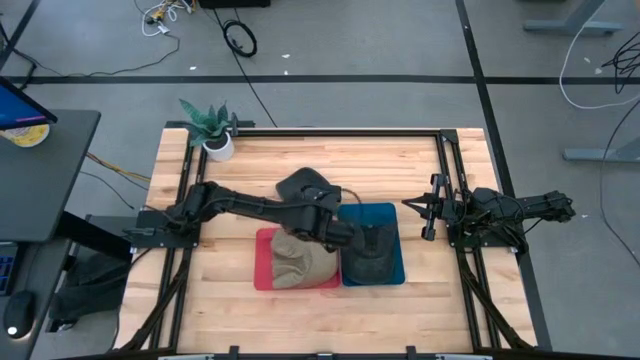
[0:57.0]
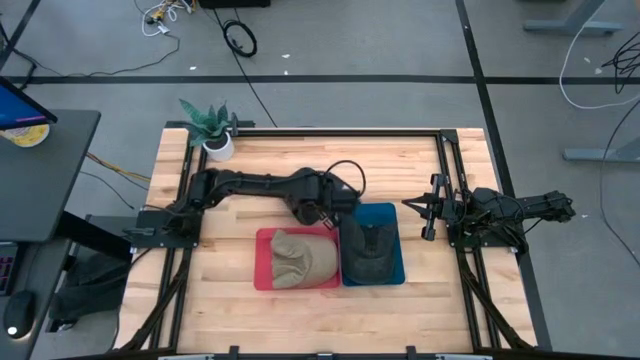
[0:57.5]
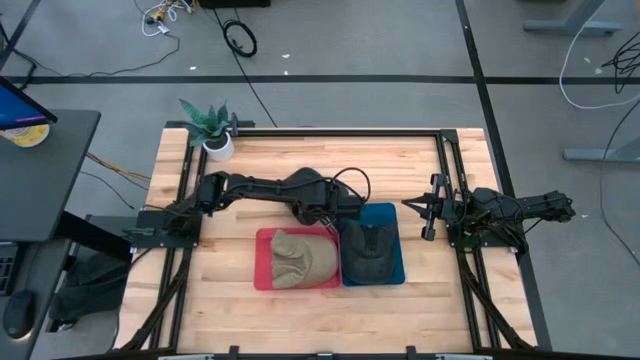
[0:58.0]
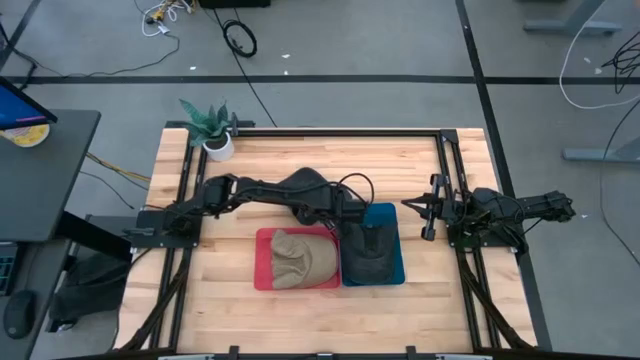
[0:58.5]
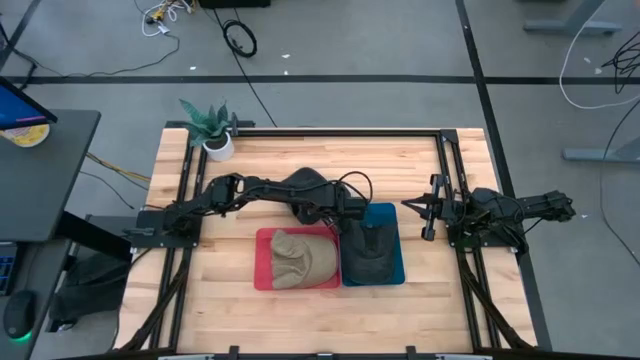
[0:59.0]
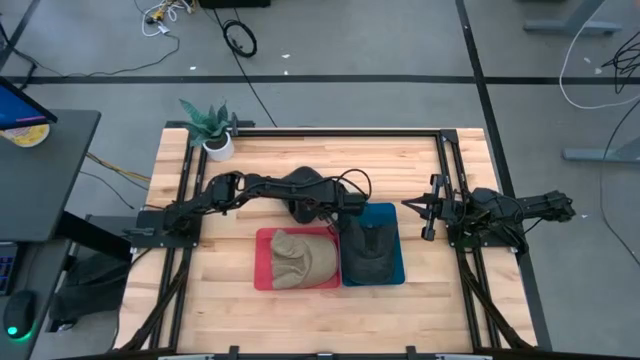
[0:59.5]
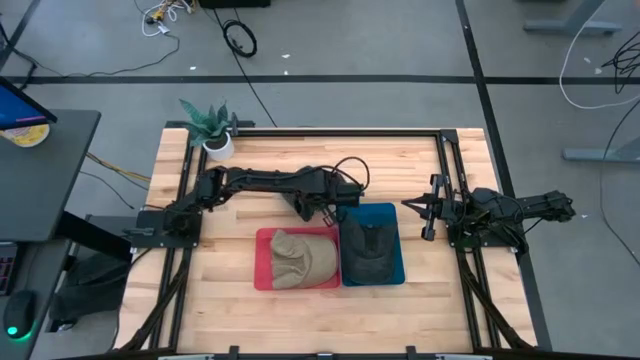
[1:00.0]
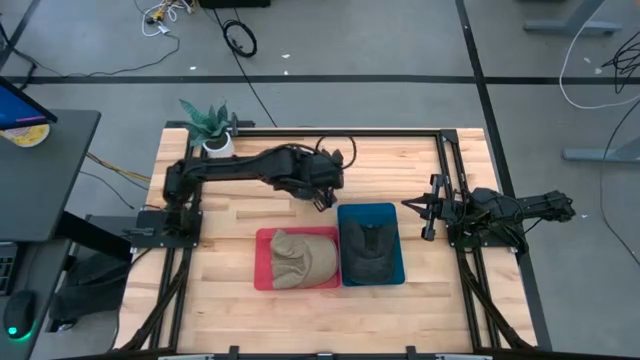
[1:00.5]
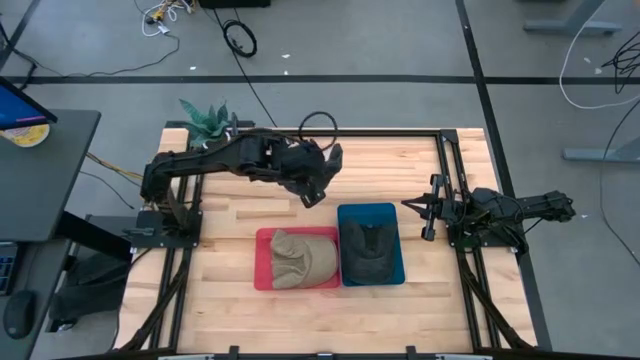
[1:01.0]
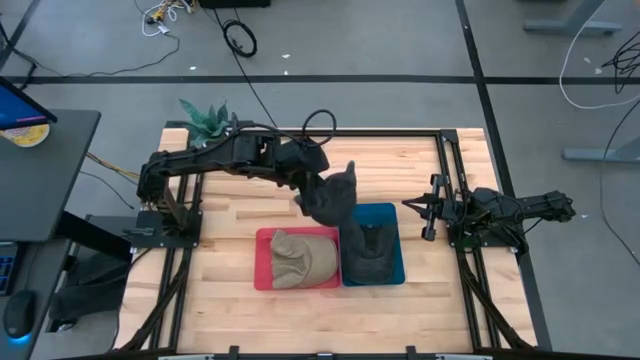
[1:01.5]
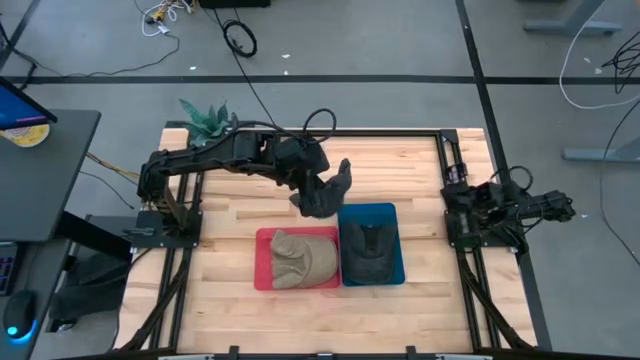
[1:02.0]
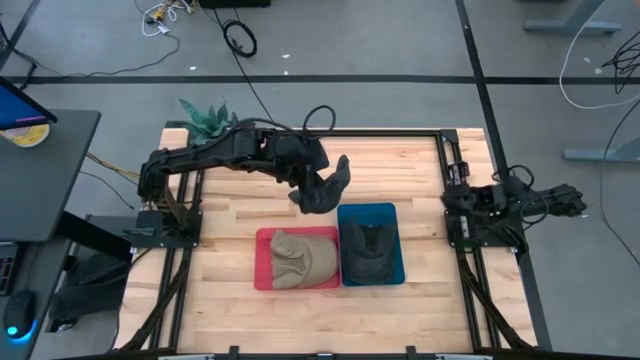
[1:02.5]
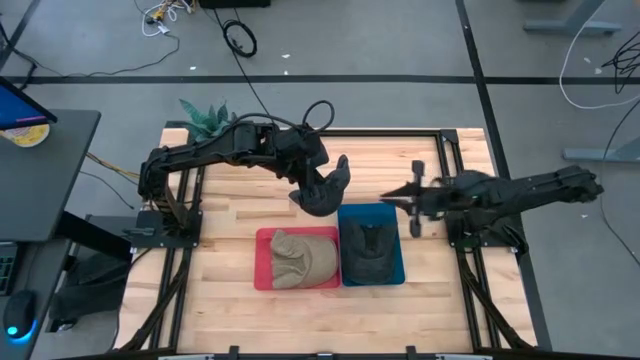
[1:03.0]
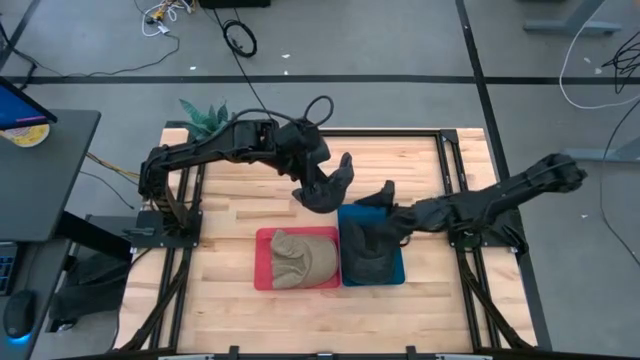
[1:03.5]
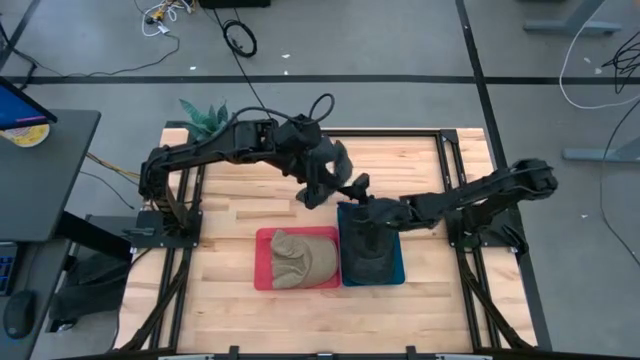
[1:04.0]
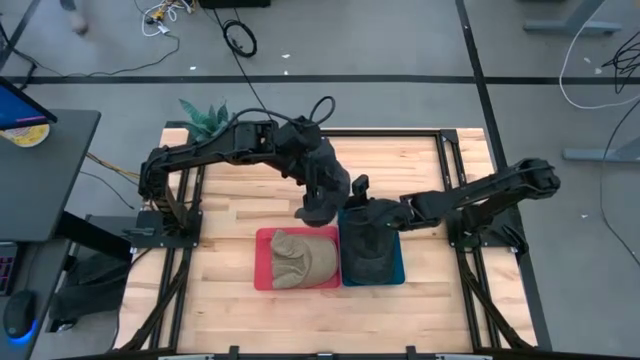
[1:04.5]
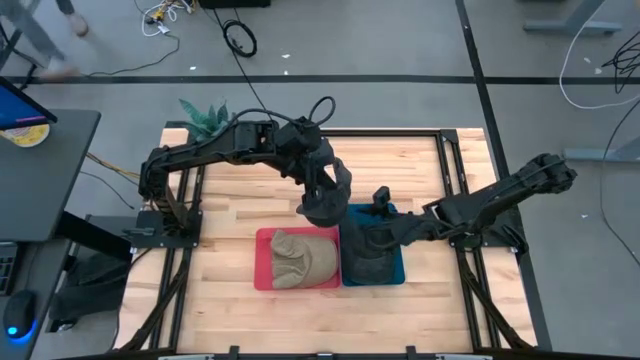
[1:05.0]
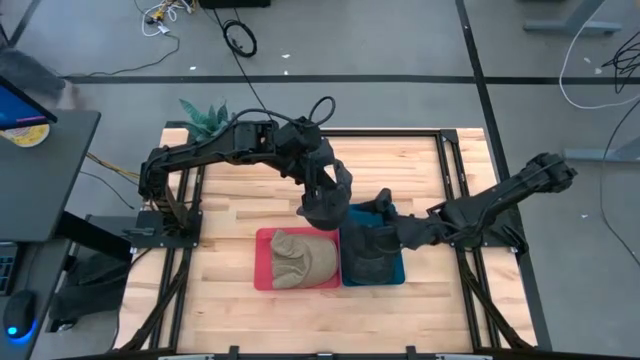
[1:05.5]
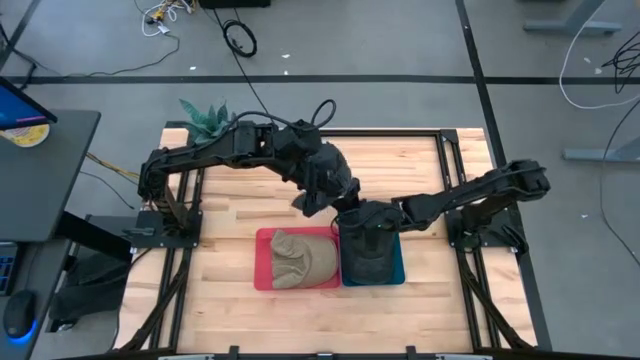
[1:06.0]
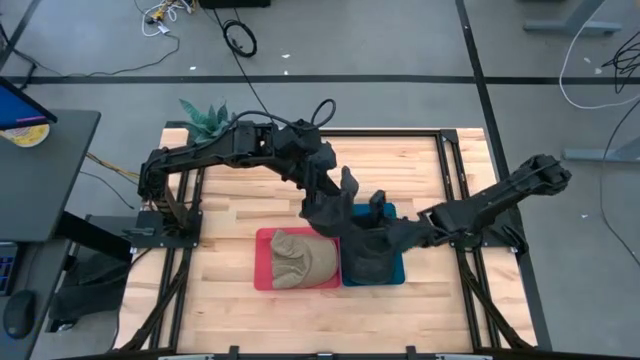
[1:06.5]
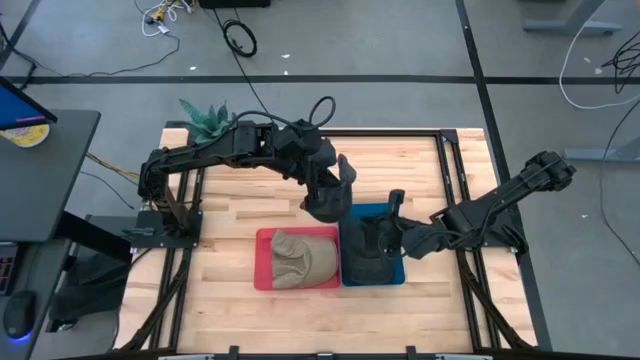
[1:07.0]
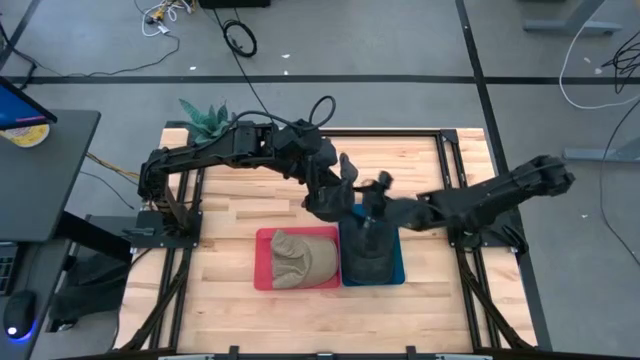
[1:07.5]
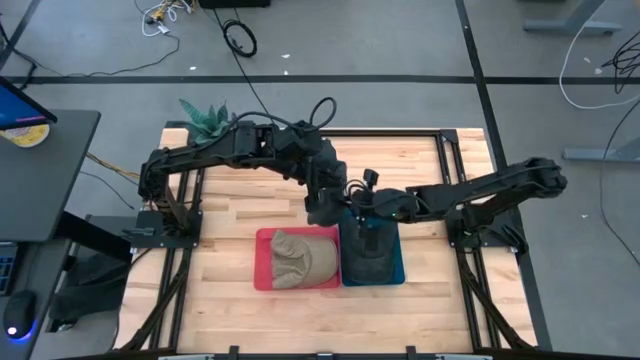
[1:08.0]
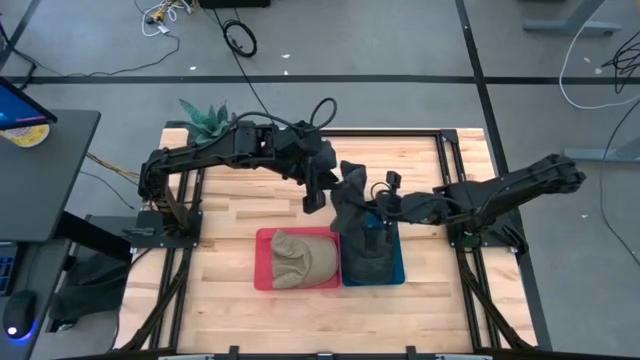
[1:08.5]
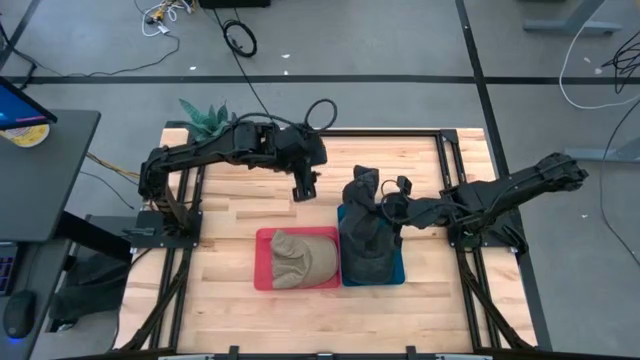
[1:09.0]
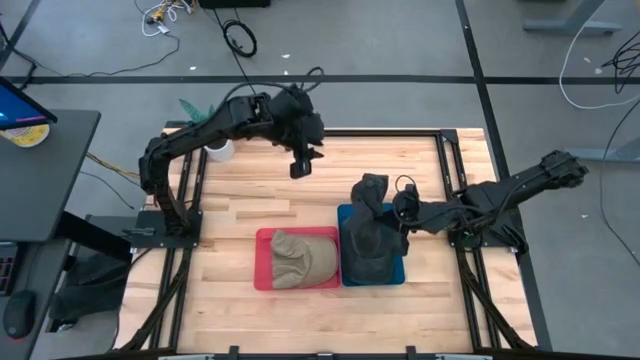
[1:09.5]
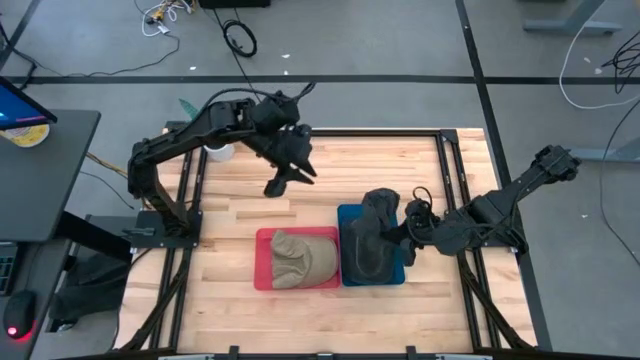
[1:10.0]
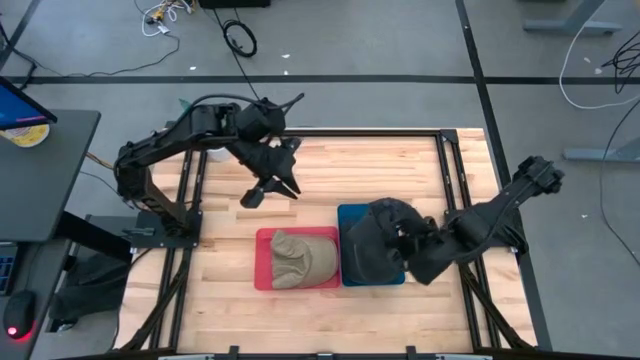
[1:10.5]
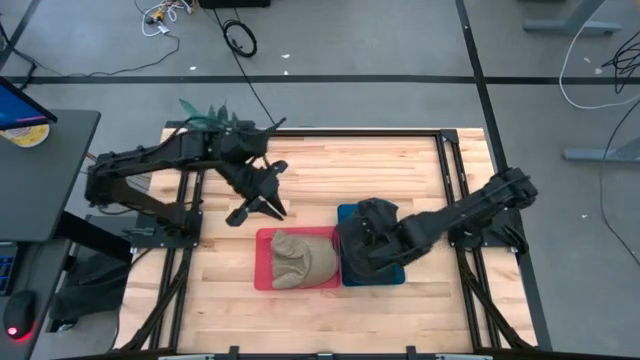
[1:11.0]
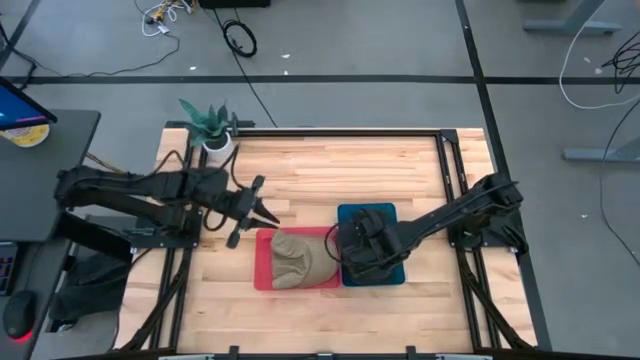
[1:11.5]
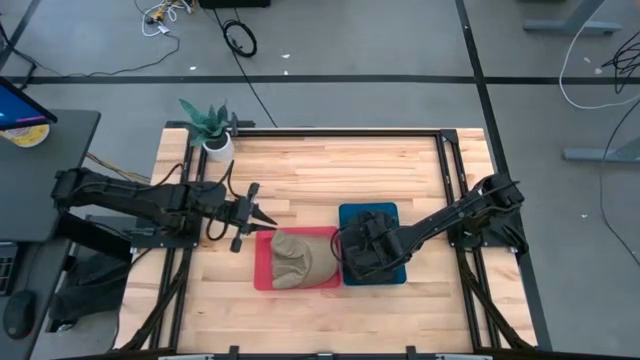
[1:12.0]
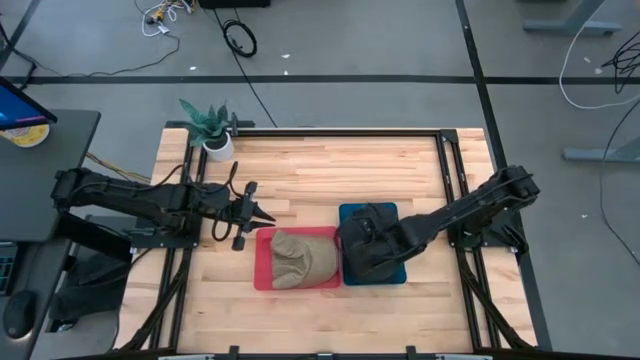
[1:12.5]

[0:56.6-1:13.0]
Task: Pick & Place hat
Put the black cap into the blue bin

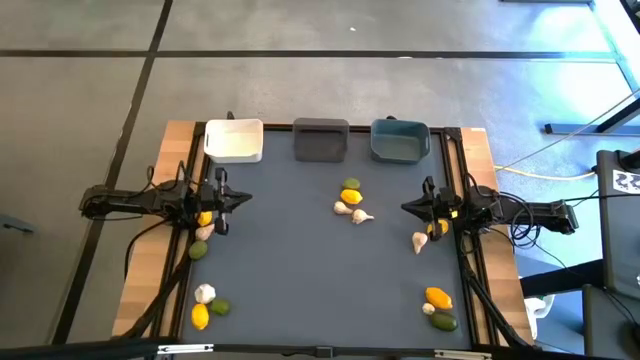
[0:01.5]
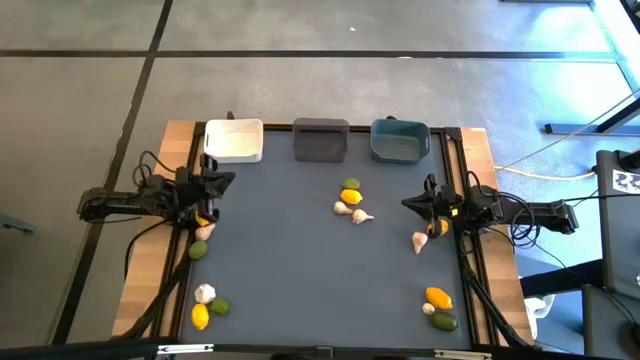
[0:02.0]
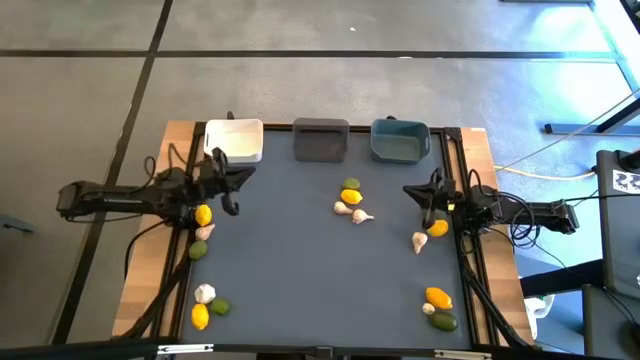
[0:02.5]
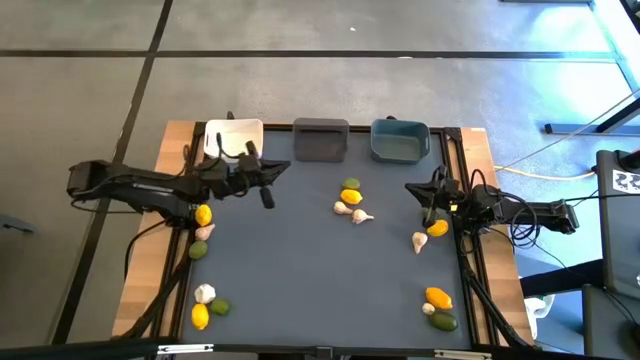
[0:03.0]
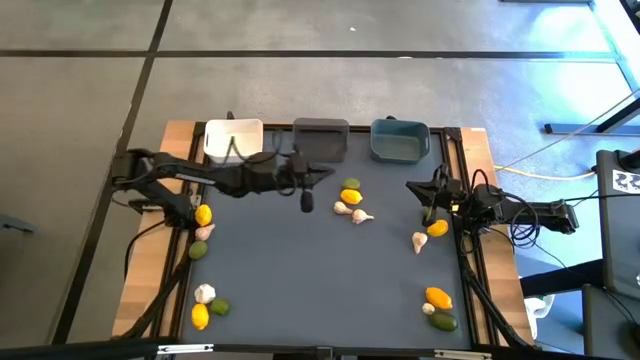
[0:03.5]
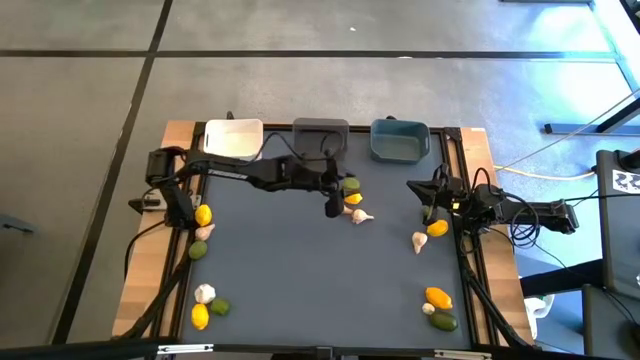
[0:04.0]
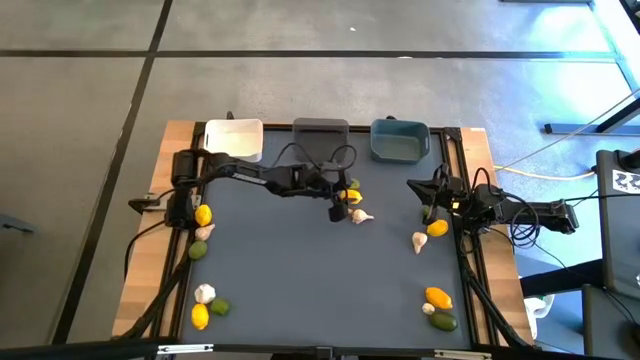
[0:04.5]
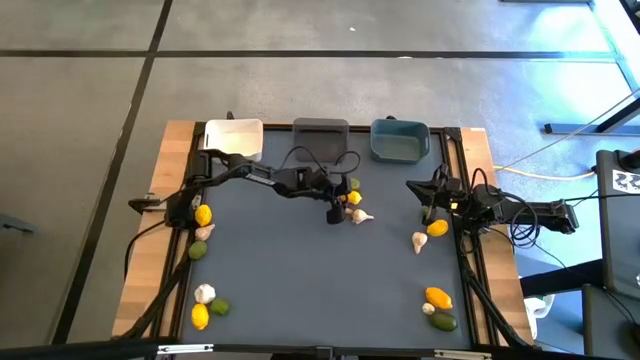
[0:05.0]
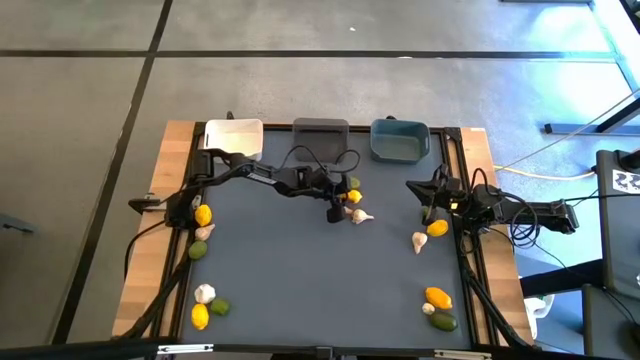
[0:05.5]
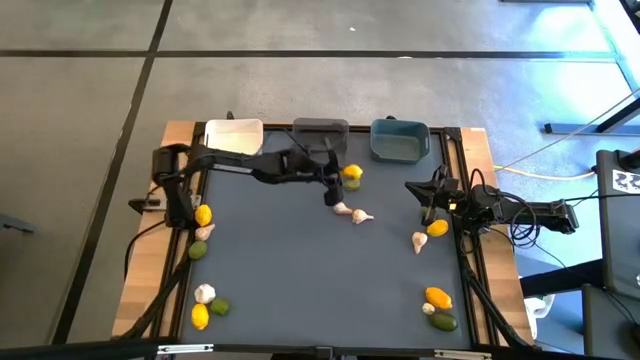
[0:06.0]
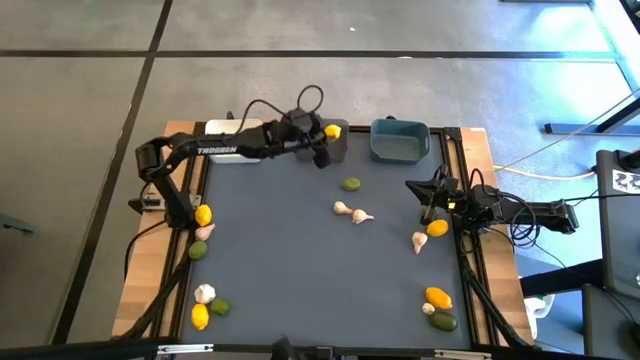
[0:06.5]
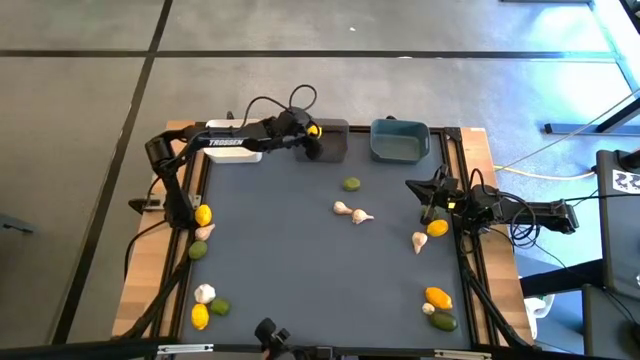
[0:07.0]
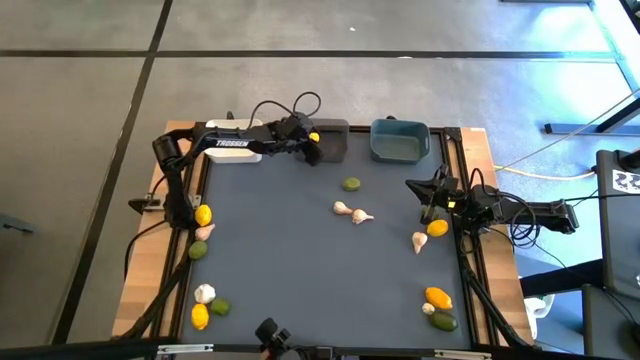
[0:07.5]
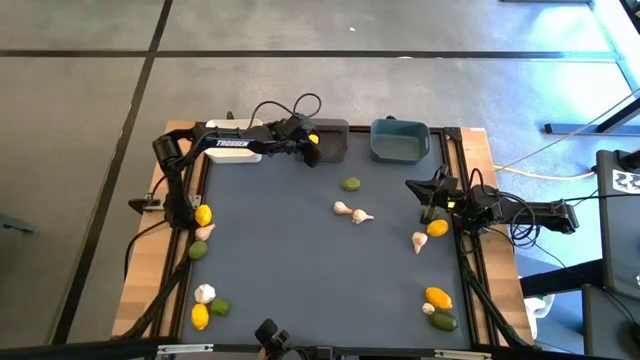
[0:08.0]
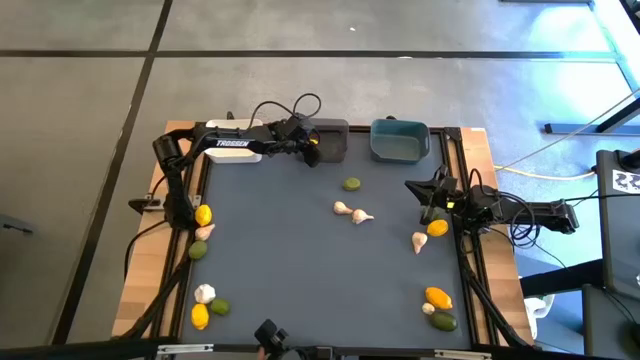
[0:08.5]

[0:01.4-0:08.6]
Task: Sort produce into baskets
Put the lemon into the black bin
